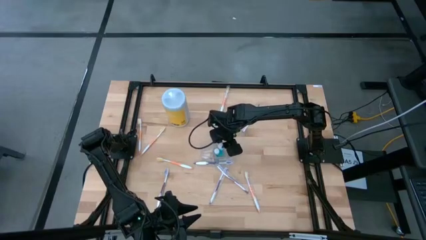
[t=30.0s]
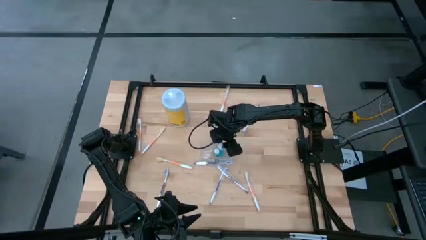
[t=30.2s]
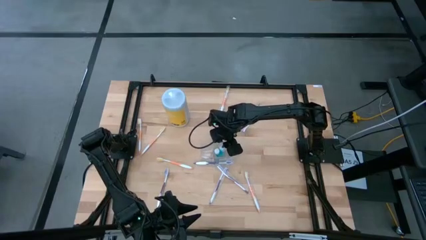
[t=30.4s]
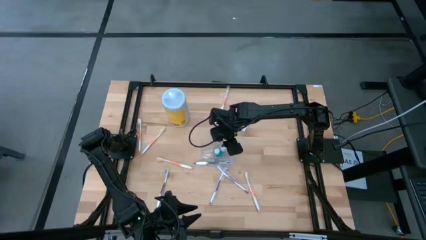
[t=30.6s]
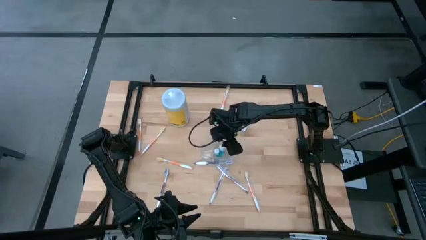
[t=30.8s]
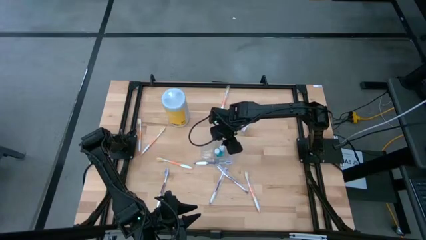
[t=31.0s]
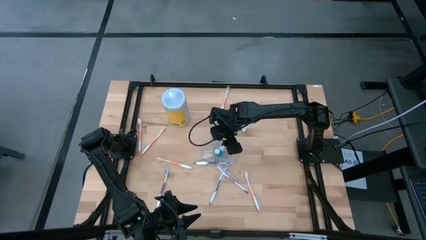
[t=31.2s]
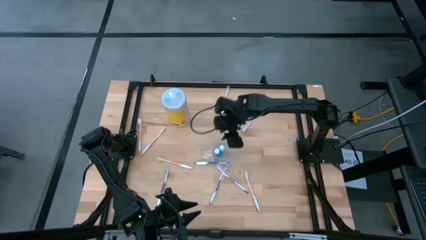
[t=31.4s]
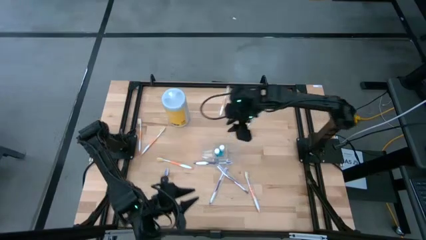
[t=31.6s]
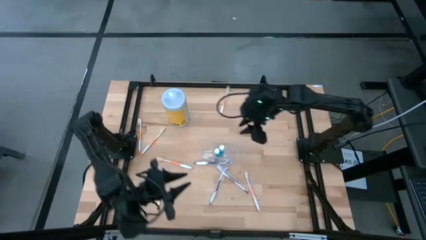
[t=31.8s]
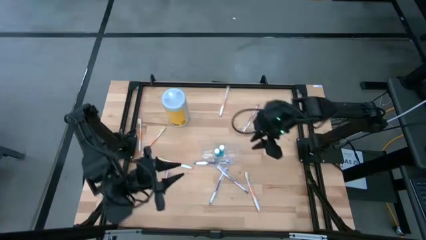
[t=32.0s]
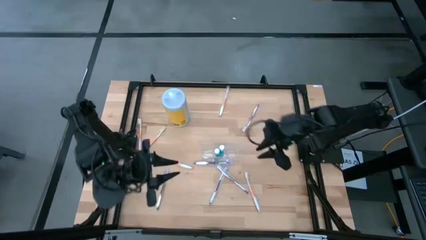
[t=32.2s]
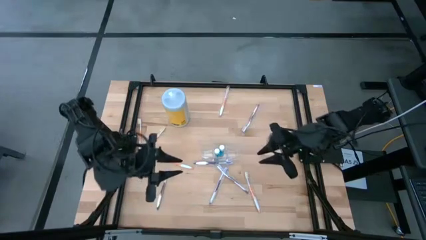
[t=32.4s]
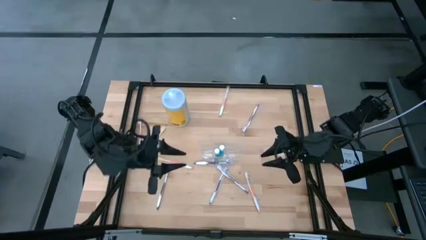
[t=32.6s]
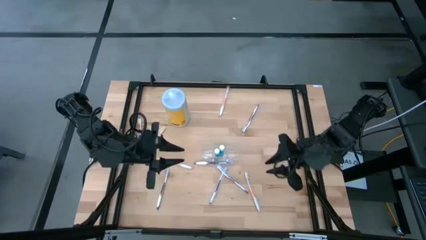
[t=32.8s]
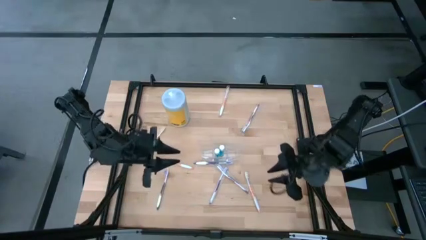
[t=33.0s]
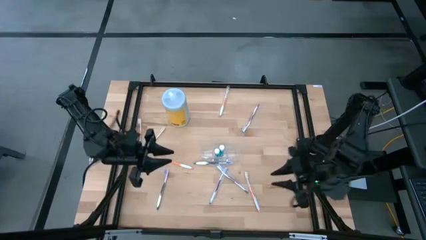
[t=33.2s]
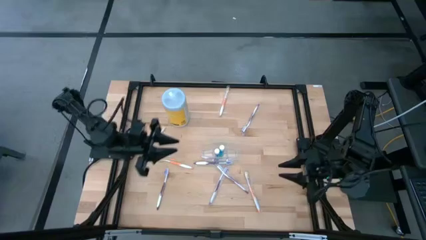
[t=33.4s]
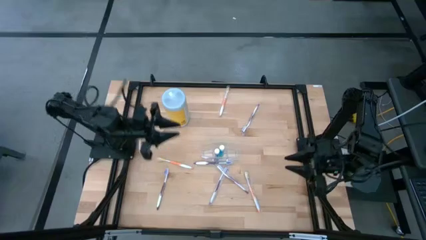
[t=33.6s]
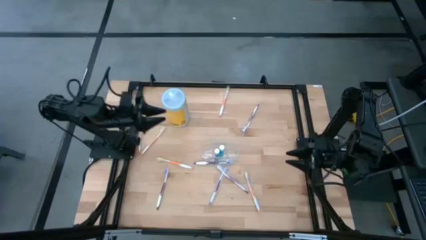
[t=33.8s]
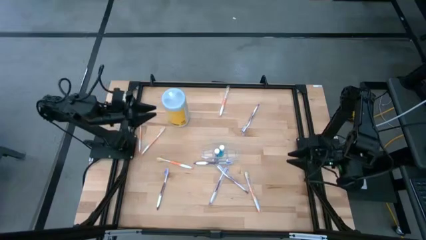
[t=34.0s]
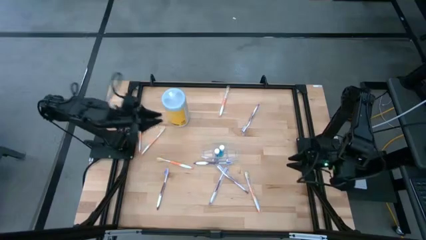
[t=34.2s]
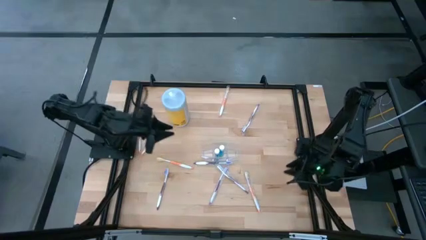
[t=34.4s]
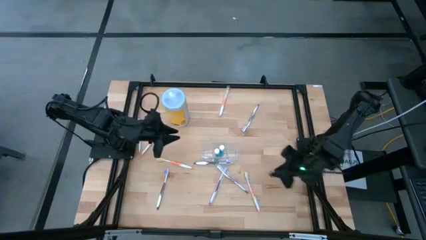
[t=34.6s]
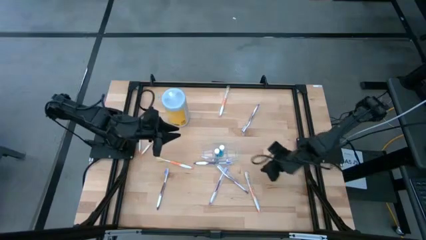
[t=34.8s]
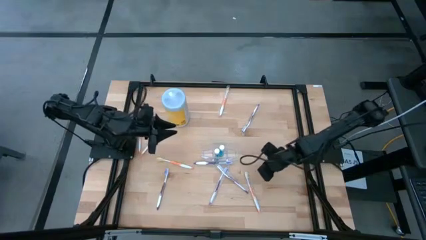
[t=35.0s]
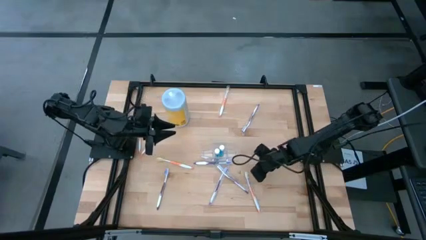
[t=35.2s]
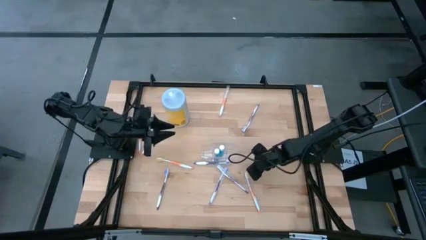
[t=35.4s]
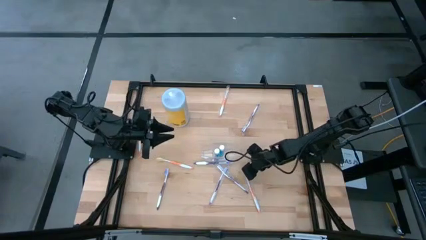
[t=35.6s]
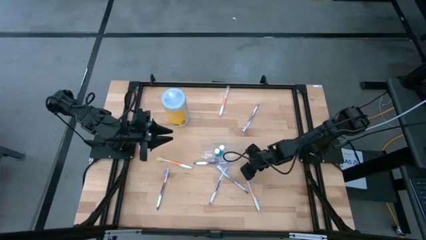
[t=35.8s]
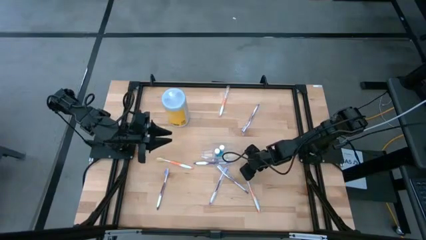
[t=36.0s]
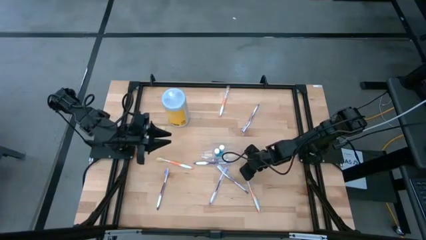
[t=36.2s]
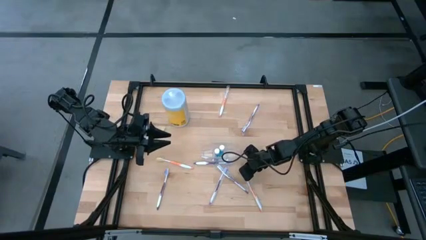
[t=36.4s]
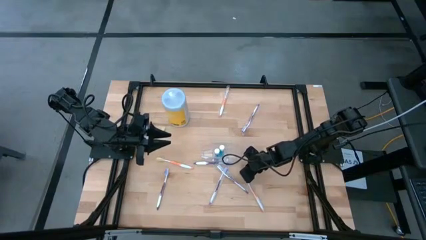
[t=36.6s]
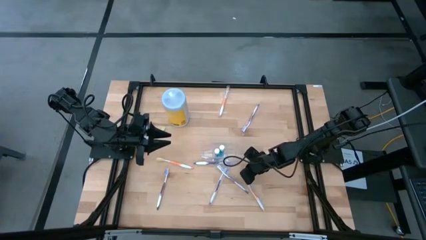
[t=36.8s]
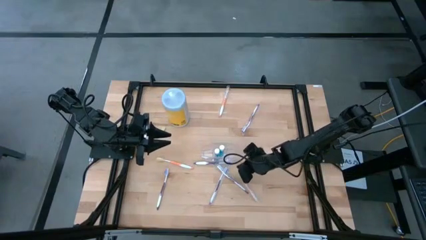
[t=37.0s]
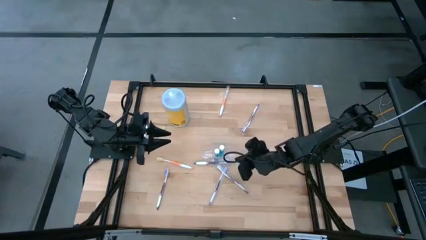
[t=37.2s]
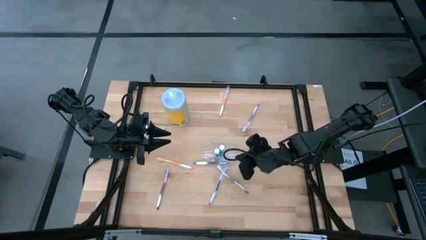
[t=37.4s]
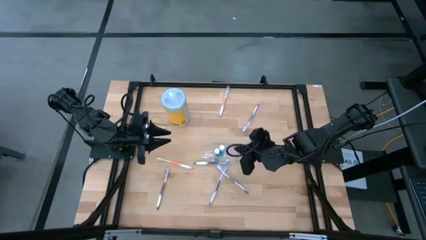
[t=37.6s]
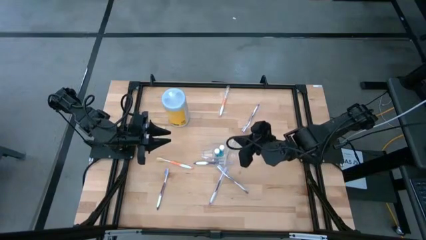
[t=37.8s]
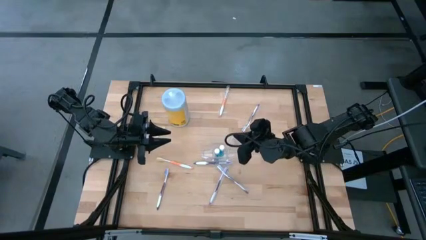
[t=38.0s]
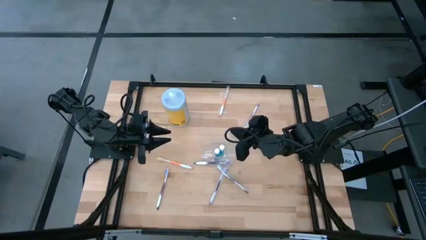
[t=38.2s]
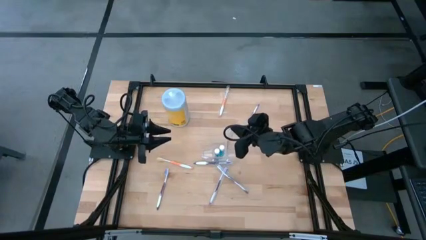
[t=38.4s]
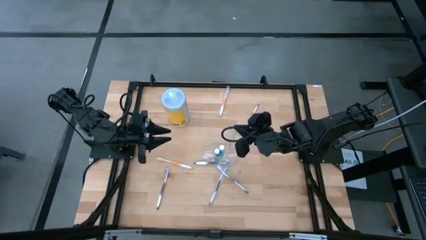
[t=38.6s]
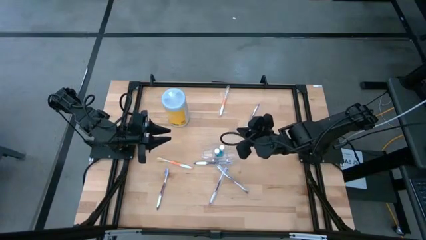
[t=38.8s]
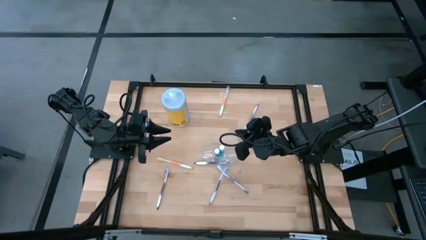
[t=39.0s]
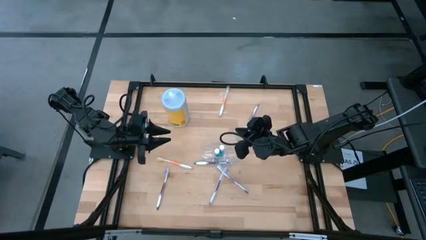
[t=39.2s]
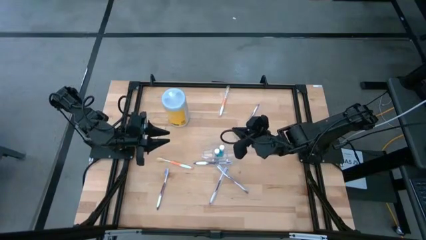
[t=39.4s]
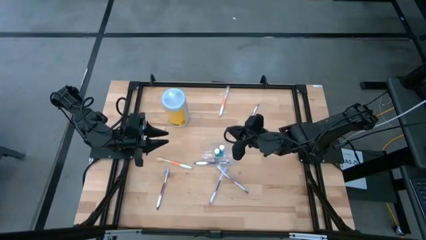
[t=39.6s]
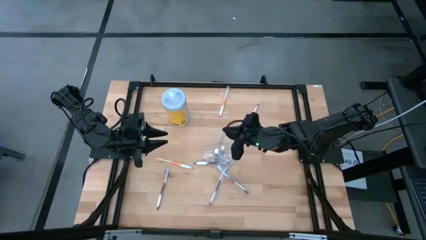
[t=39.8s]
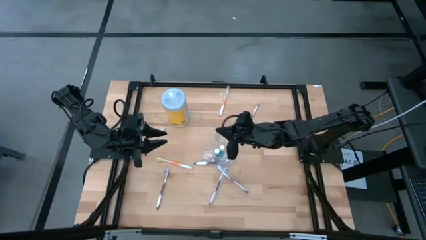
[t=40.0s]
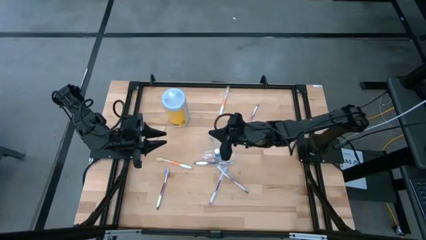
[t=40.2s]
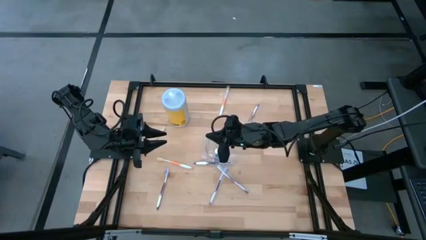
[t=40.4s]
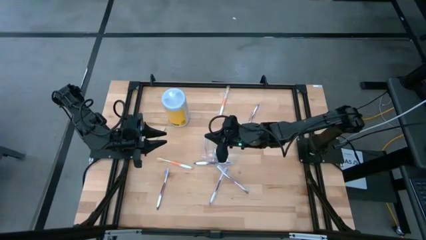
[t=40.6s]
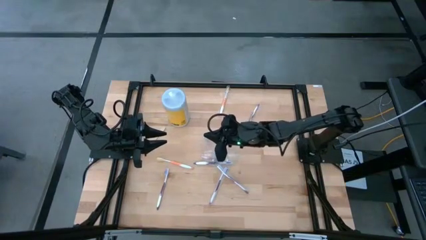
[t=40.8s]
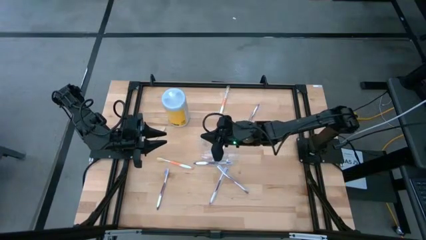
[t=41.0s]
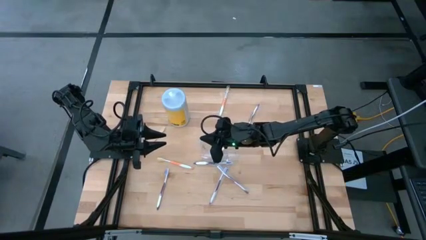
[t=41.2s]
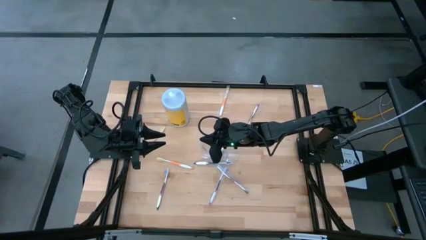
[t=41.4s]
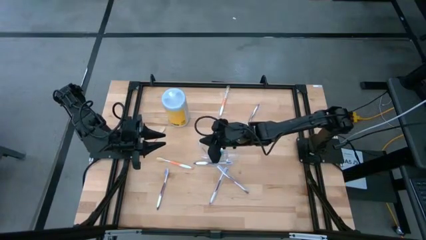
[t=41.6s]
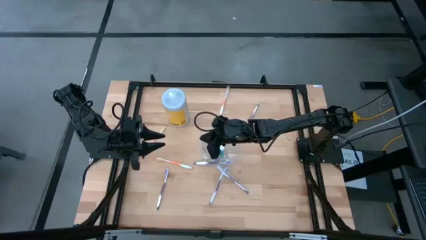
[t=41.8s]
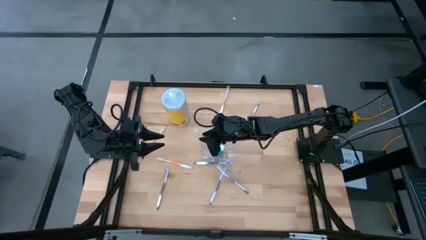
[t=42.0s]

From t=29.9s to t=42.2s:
Task: Pick & Place toothbrushing station
Put the white and orange toothbrush into the left compartment of the transparent organizer

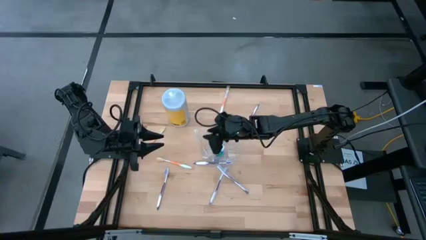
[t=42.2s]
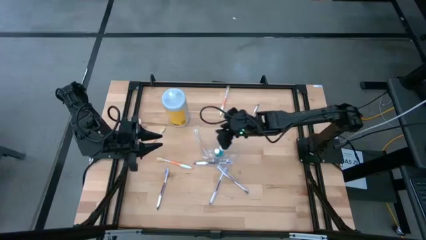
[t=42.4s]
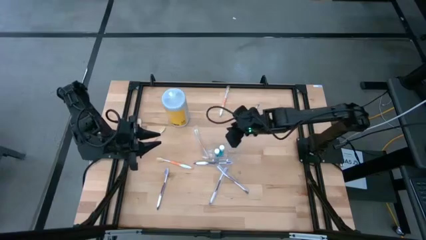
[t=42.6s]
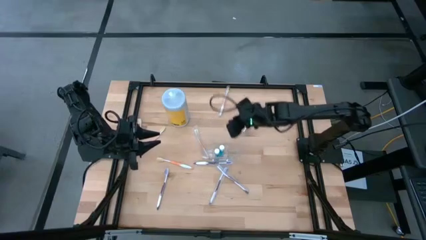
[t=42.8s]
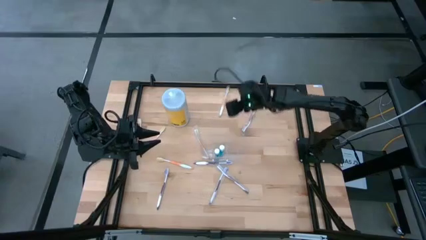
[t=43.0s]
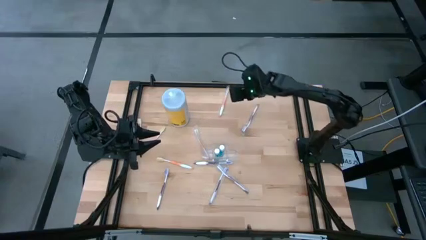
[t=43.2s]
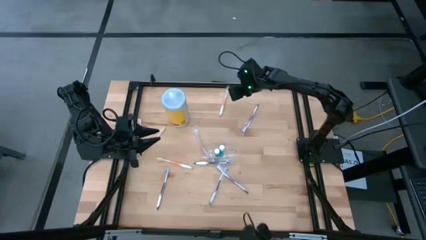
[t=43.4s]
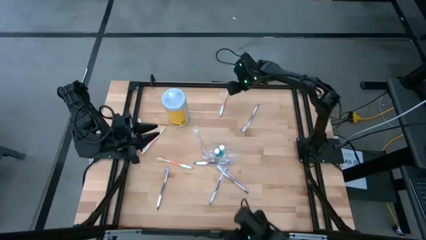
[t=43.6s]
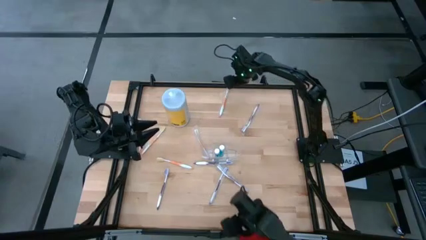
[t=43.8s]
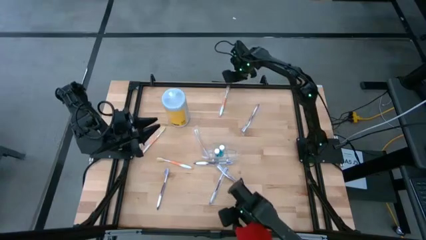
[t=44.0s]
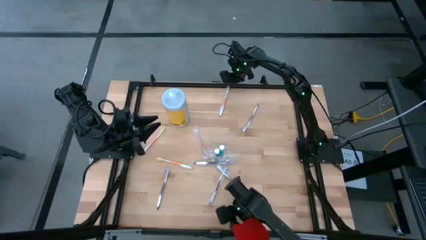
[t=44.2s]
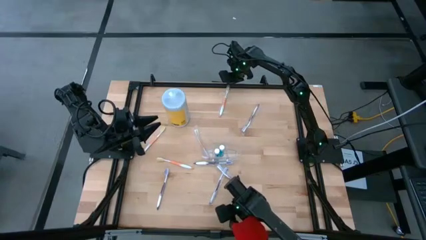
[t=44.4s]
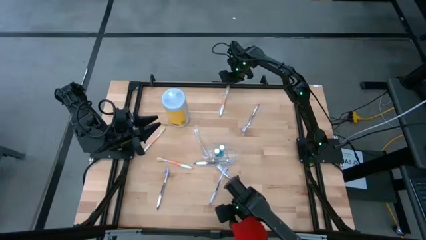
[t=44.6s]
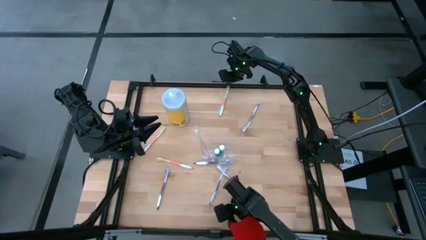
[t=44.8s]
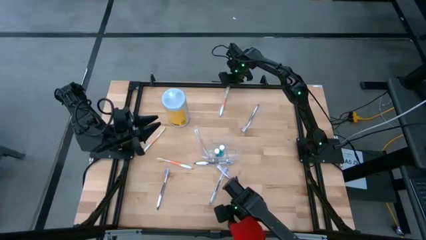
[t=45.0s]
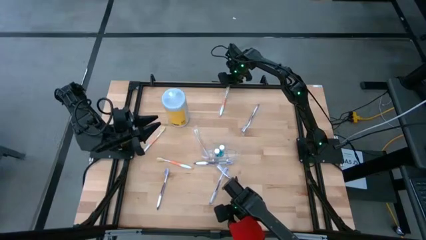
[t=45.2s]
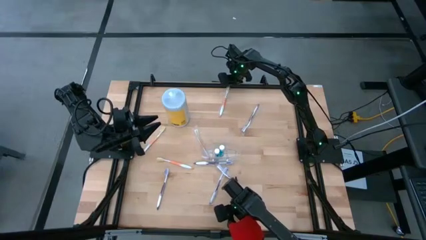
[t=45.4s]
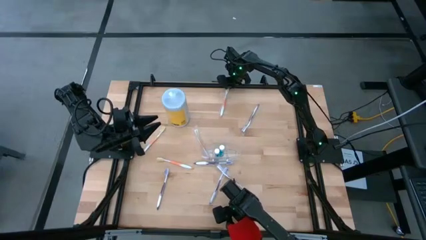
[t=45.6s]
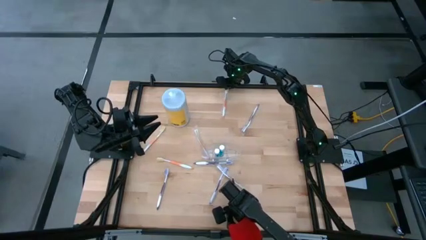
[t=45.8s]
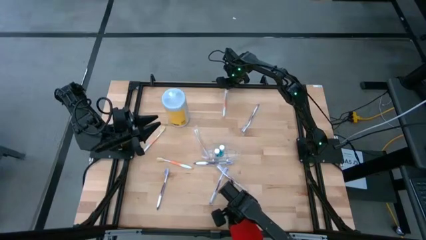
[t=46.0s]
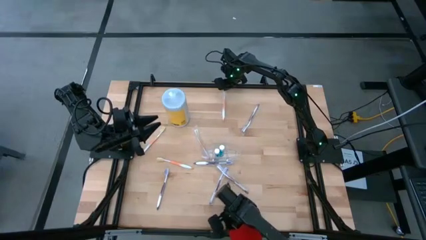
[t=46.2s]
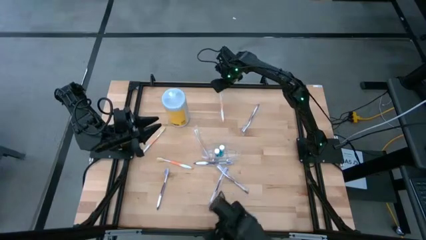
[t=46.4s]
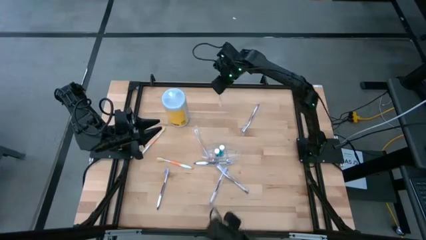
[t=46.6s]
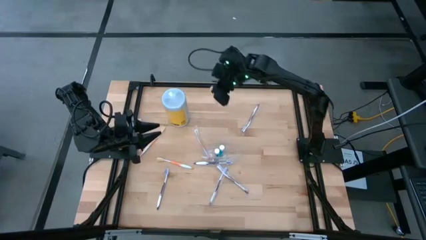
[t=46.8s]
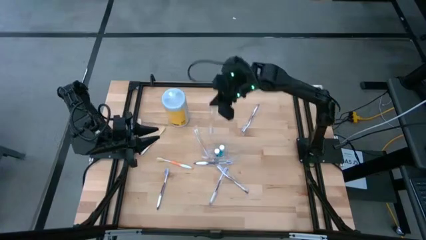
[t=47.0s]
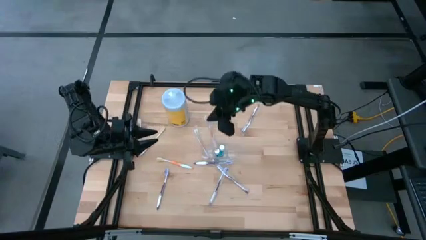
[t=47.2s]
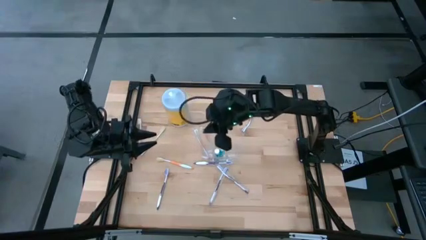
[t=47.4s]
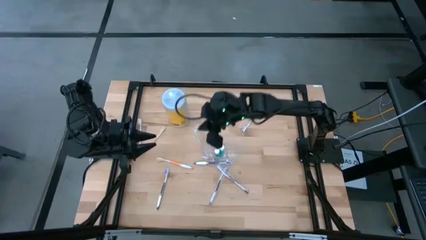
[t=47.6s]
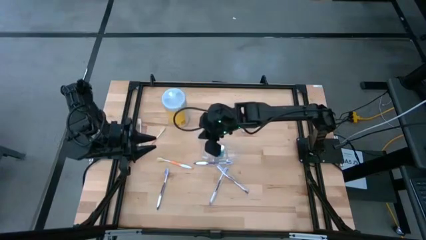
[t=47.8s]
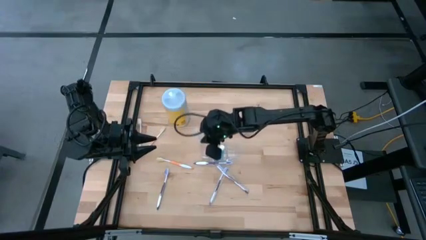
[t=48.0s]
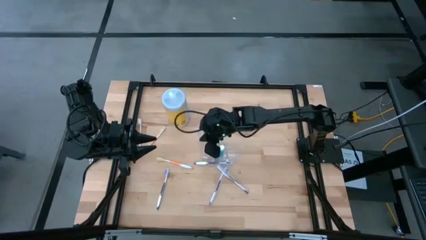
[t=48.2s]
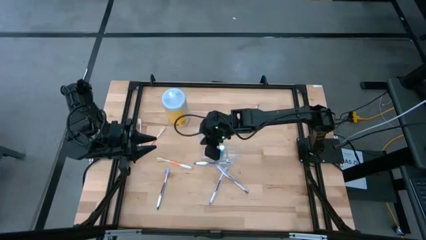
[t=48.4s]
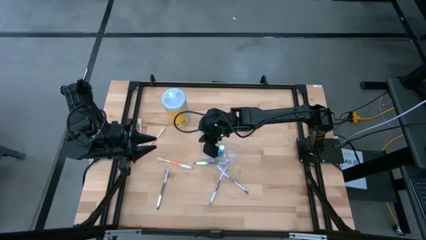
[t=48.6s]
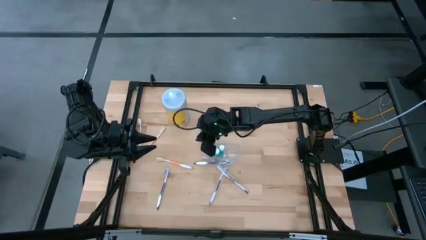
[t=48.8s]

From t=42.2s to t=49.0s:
Put the white and orange toothbrush into the left compartment of the transparent organizer
